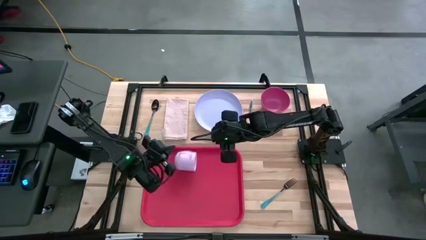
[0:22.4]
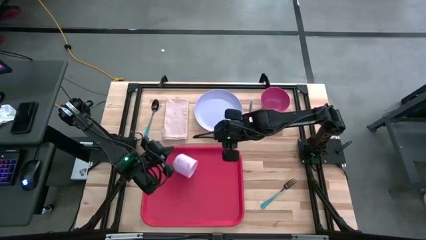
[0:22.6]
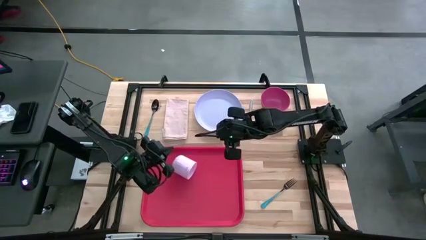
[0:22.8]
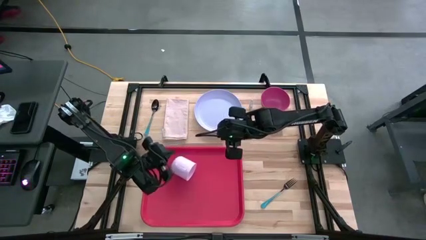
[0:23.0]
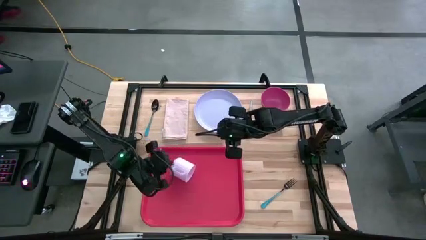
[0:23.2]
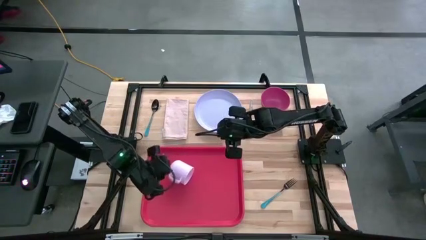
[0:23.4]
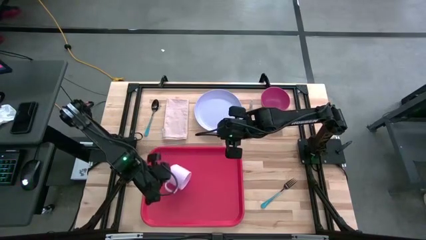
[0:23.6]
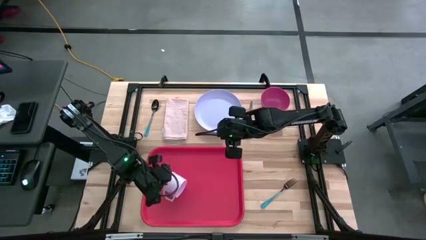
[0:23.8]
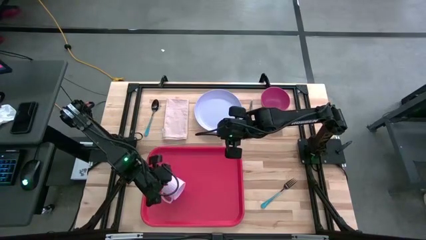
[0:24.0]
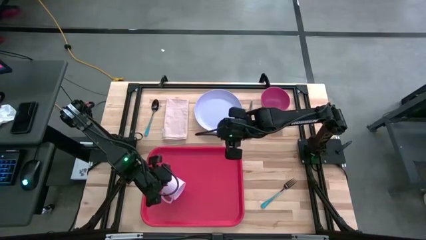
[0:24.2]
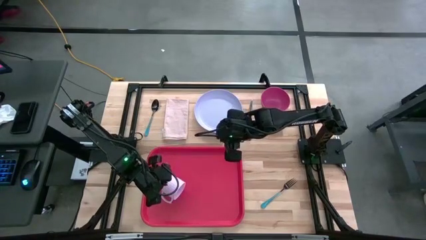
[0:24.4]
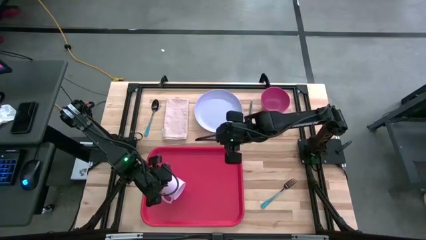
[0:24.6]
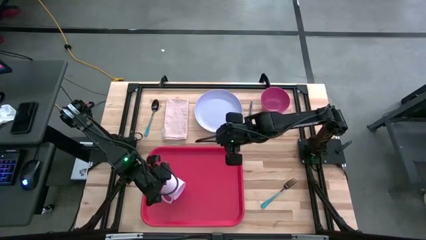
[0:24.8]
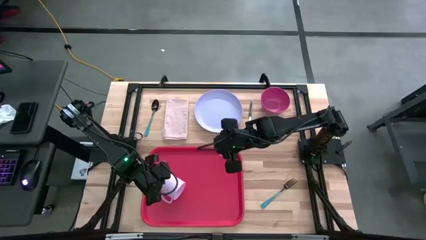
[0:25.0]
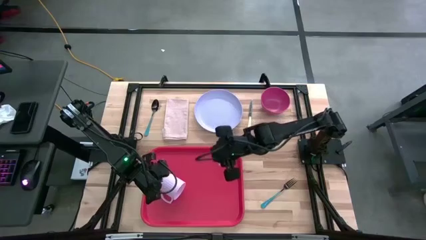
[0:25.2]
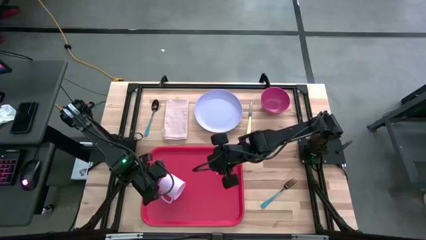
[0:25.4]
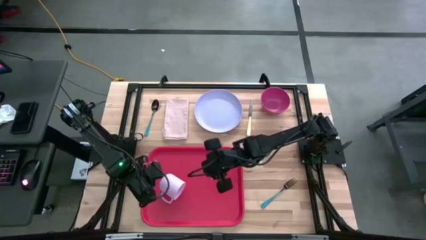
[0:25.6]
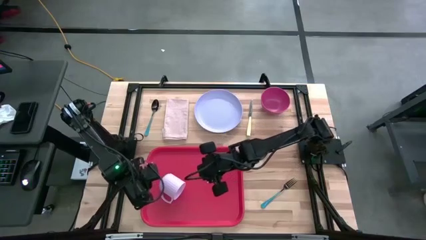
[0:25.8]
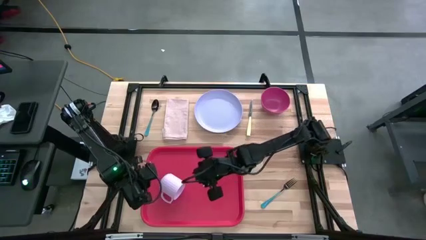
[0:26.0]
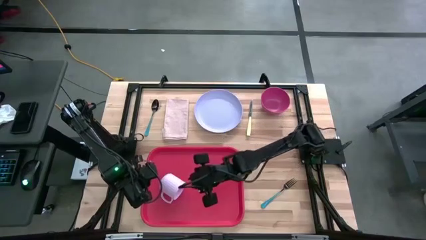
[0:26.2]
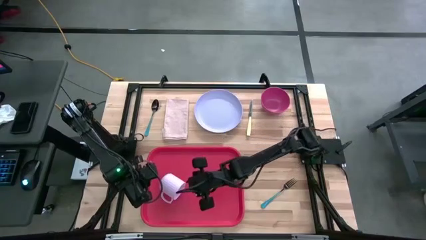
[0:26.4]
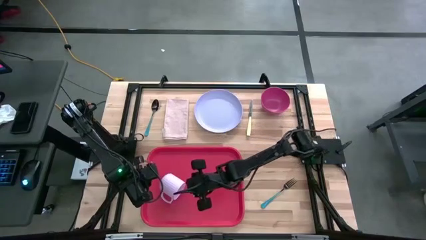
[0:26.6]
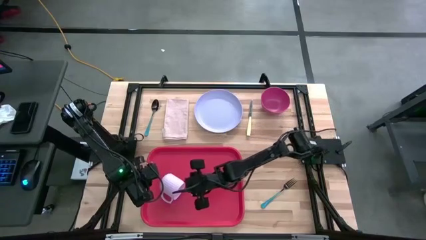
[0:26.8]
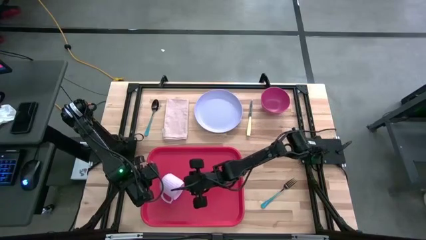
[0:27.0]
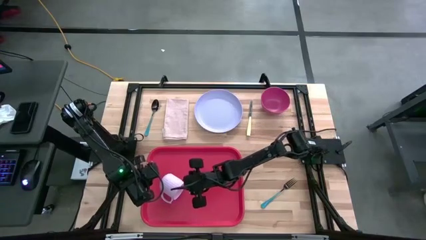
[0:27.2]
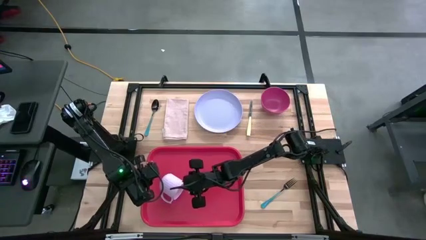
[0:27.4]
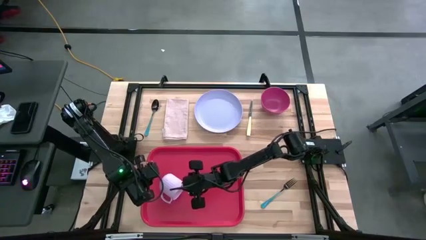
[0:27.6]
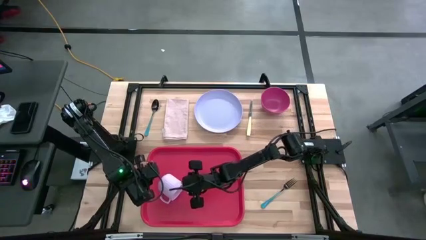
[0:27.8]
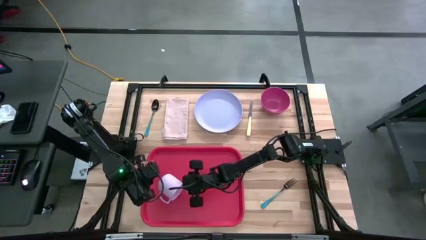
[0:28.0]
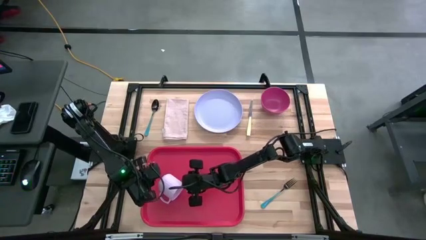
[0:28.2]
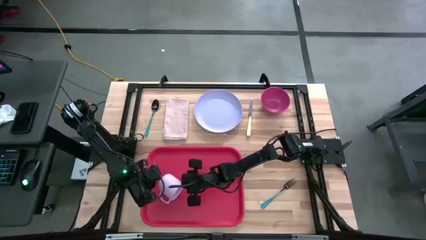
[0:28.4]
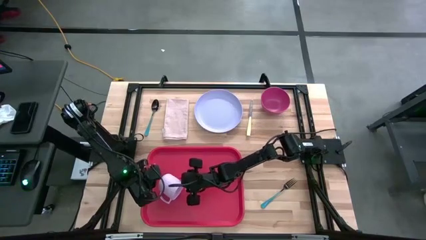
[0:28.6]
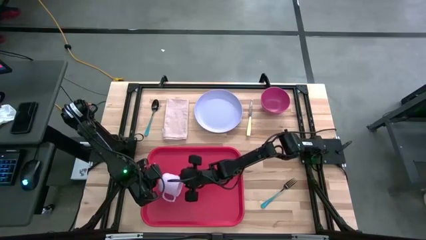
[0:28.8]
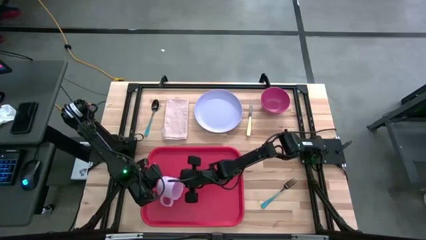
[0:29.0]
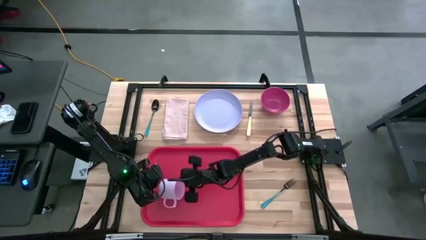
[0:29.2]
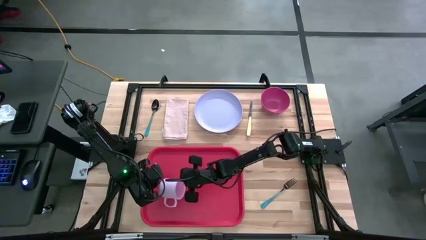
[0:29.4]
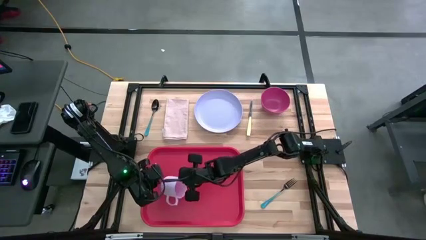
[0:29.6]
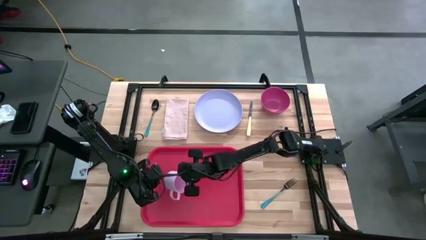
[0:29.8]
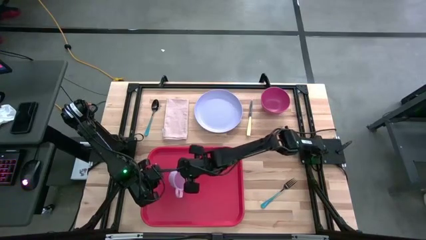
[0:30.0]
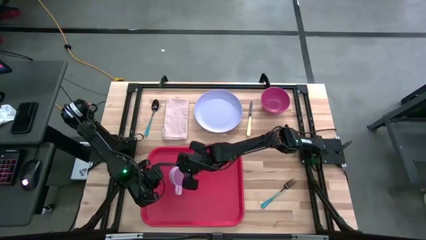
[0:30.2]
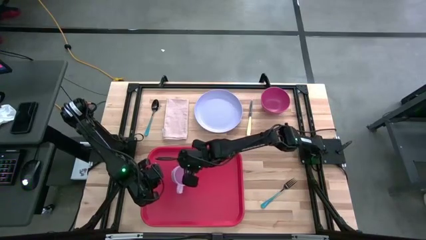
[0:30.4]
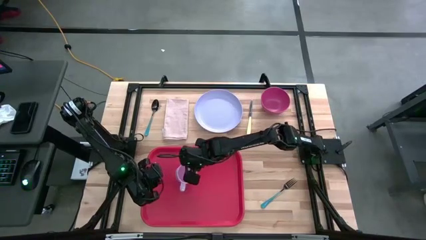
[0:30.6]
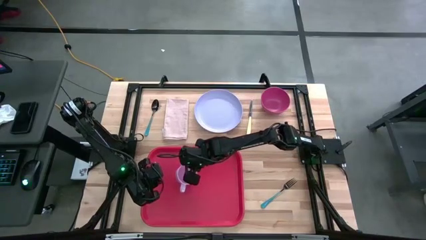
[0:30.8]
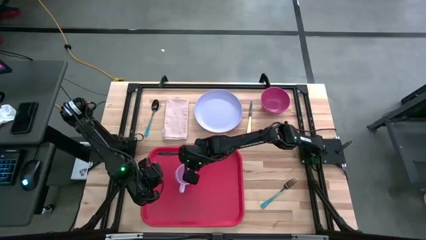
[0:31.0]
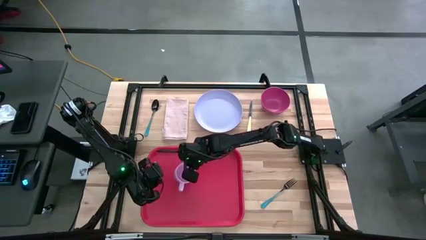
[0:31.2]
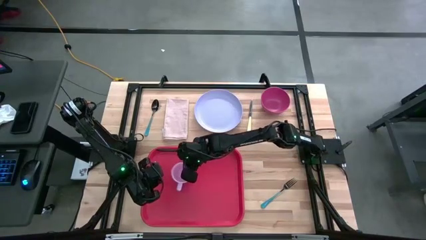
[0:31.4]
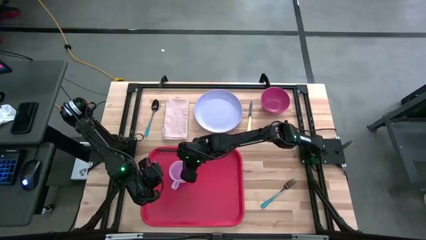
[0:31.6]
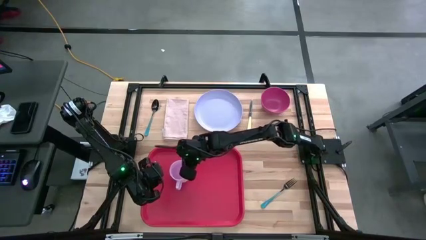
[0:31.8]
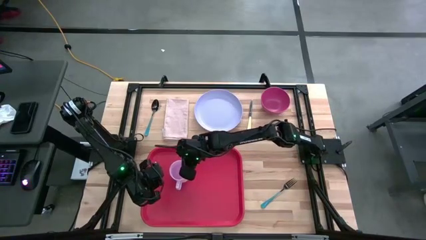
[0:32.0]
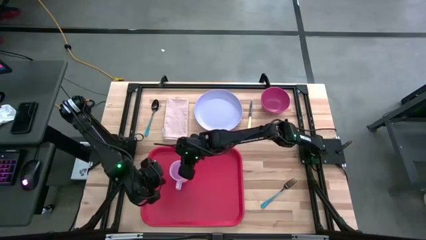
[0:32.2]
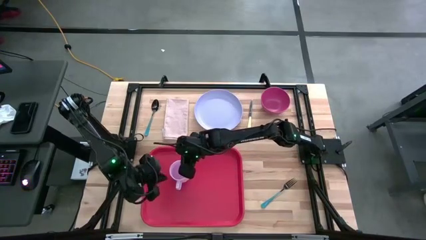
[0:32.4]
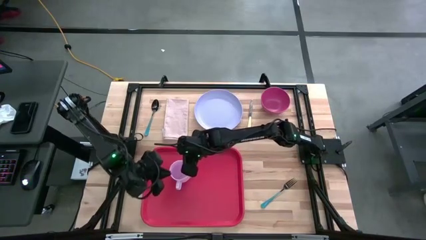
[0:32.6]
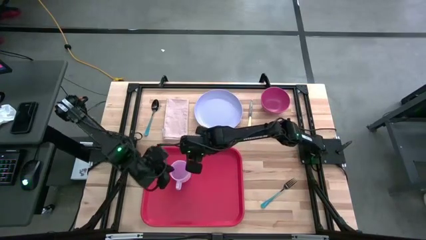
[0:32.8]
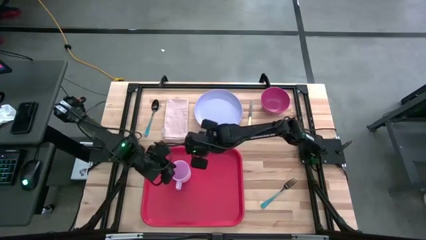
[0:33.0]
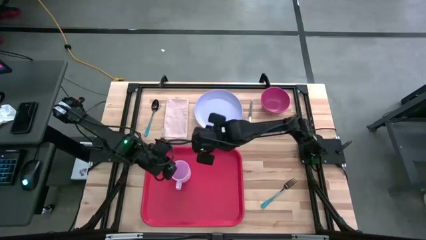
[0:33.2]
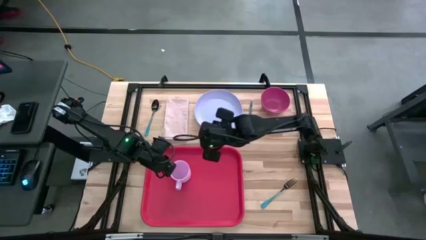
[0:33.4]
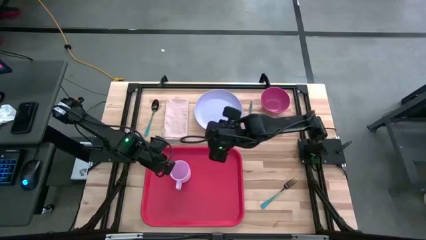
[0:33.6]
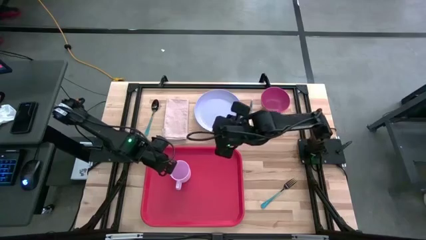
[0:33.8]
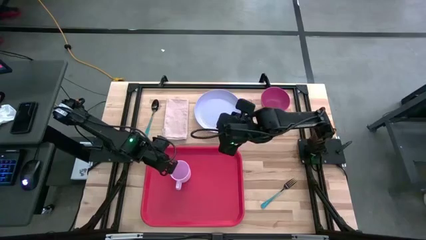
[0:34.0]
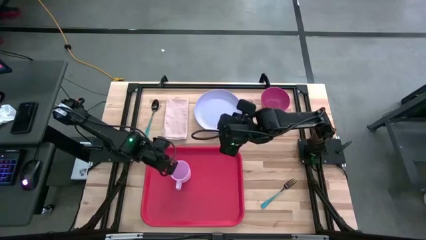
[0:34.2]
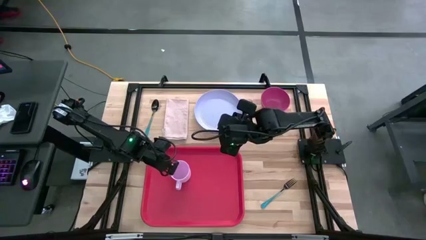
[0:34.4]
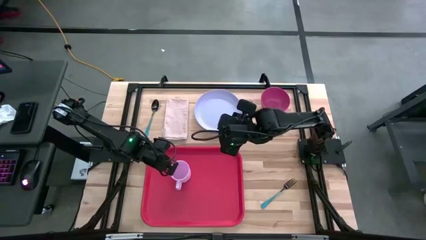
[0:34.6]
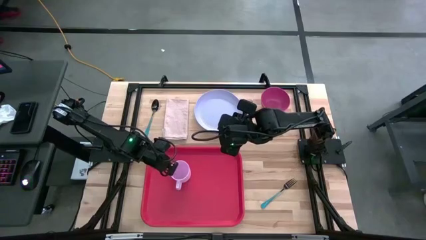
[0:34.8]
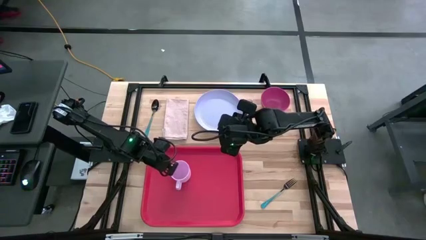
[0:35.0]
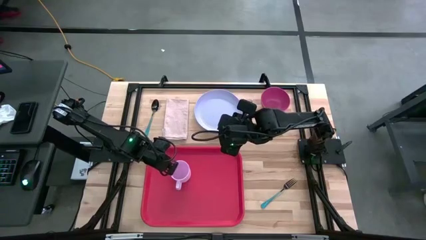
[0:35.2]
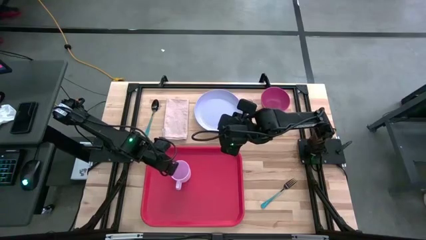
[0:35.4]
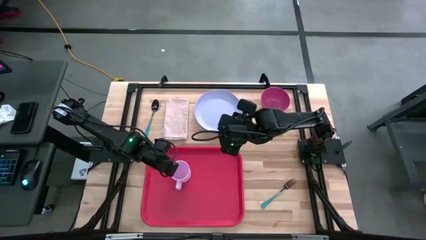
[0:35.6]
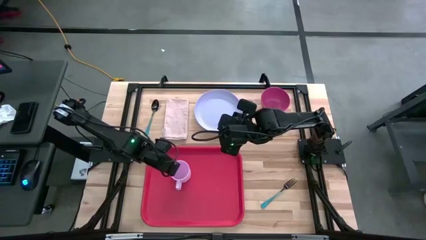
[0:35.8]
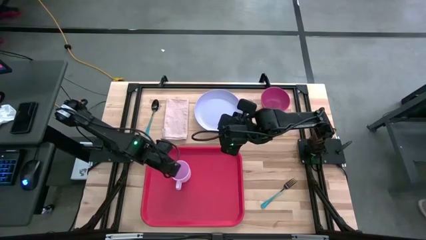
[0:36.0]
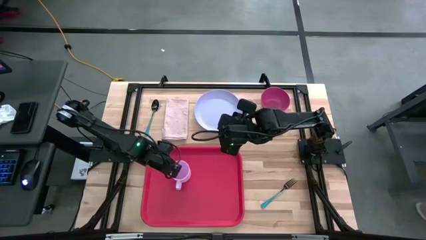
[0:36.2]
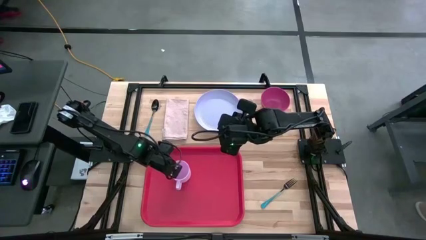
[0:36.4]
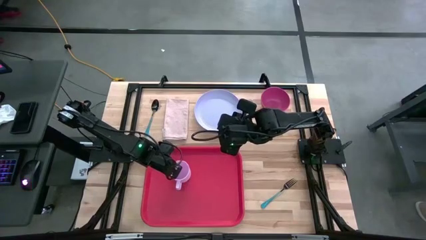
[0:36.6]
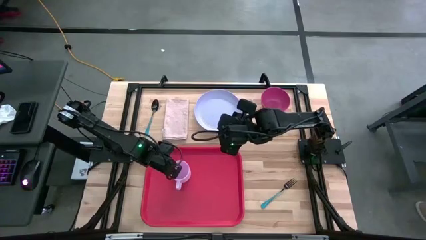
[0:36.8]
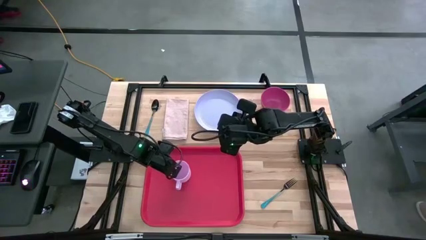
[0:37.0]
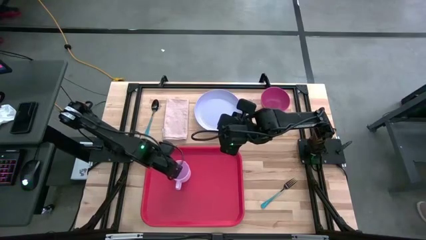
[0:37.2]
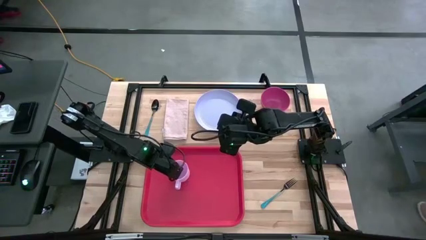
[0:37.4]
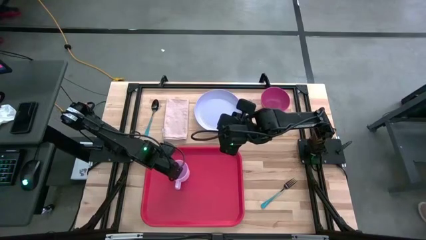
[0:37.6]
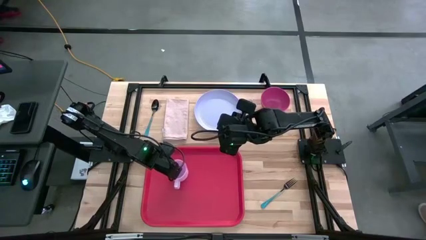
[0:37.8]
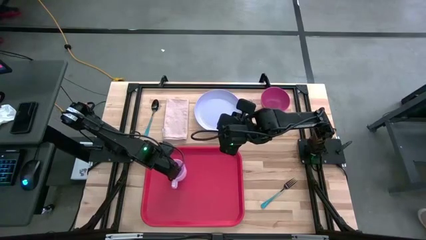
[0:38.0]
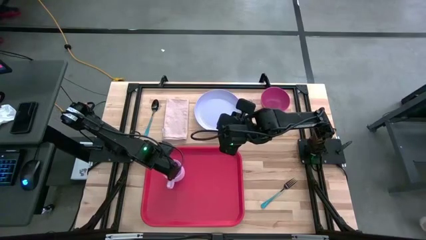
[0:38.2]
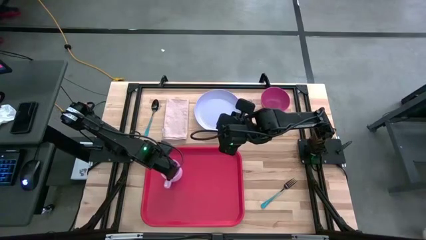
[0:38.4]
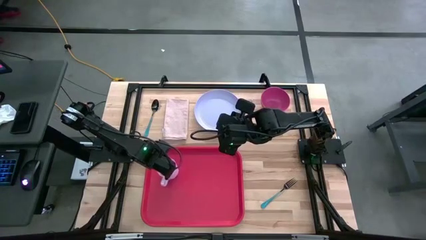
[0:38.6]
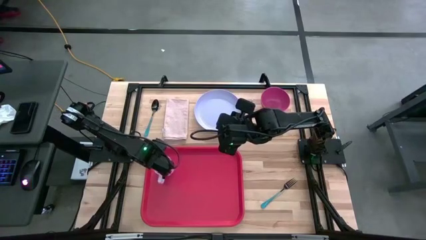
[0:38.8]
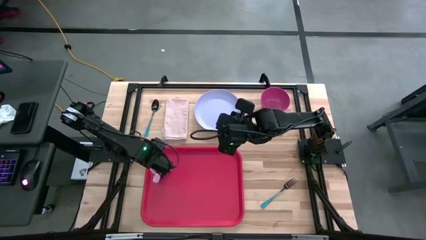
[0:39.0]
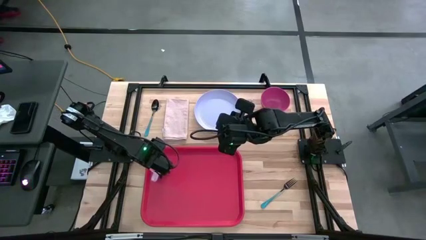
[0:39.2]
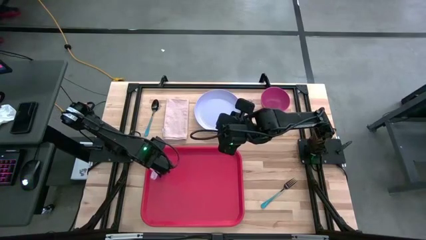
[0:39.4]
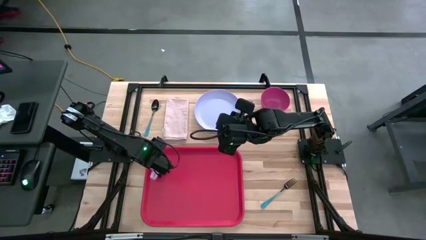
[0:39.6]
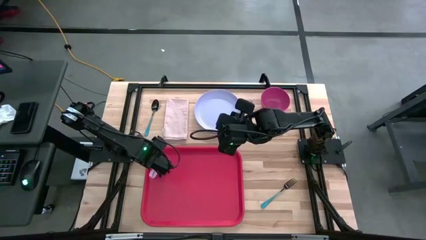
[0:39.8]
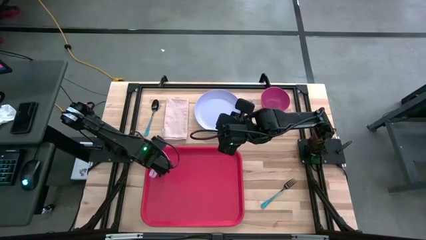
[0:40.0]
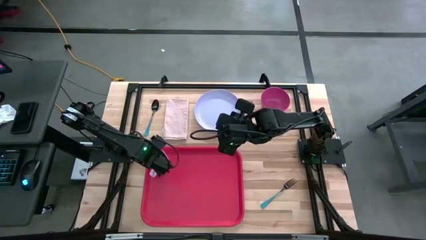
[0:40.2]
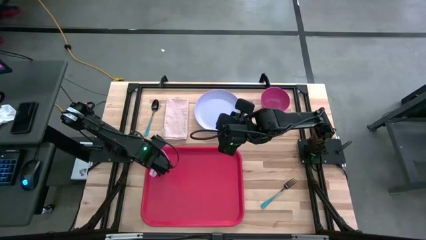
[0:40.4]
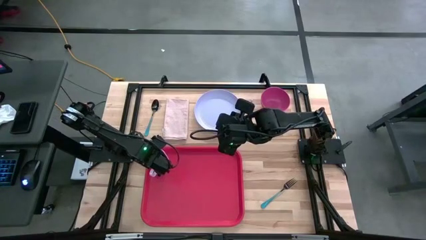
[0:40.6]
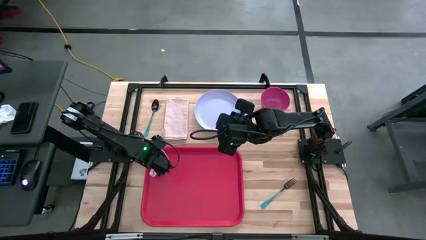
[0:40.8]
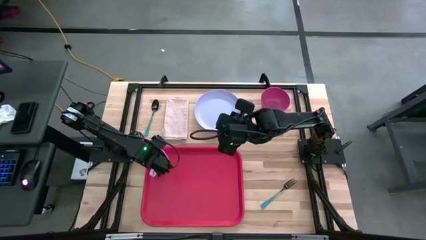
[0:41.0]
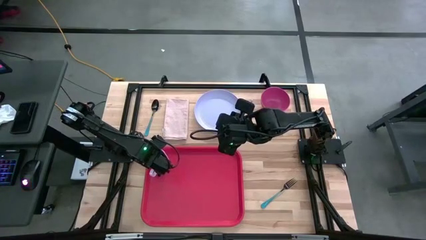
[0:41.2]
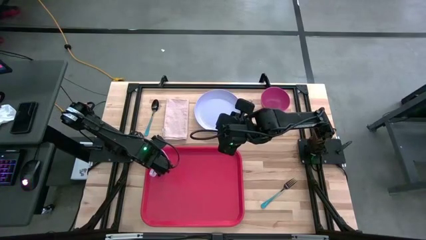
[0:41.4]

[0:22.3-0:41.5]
Task: Set up tray
Put the pink mug on the top left of the orange serving tray
